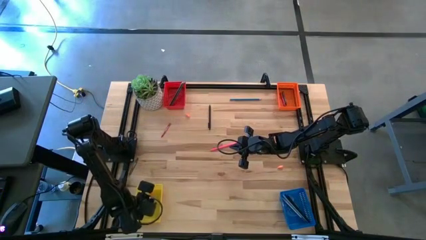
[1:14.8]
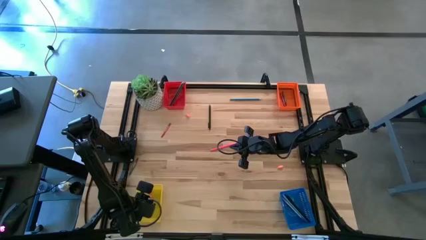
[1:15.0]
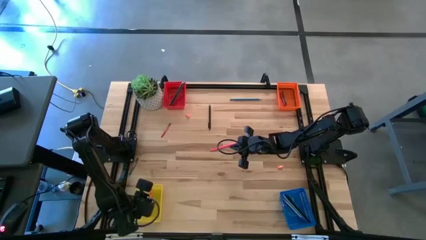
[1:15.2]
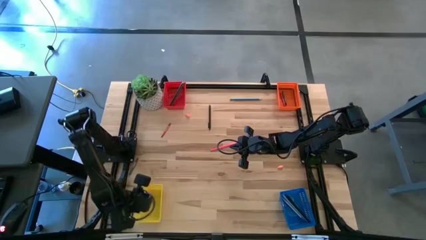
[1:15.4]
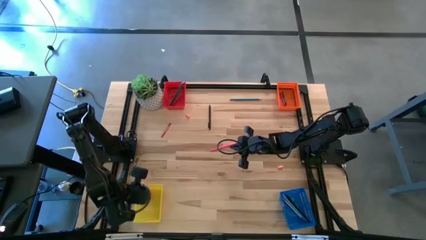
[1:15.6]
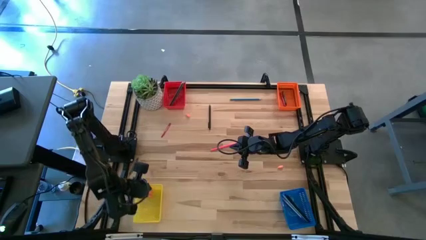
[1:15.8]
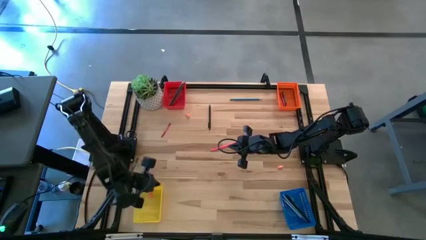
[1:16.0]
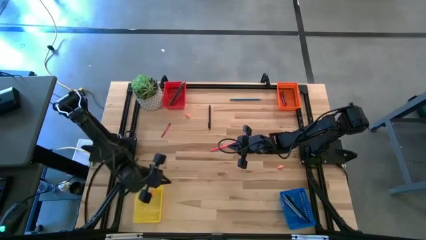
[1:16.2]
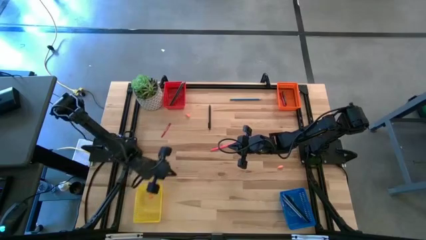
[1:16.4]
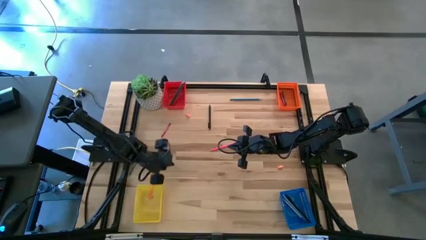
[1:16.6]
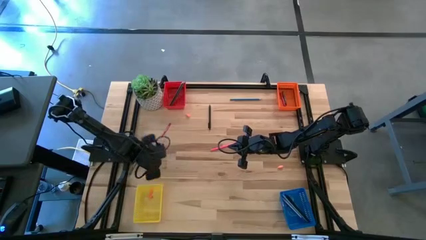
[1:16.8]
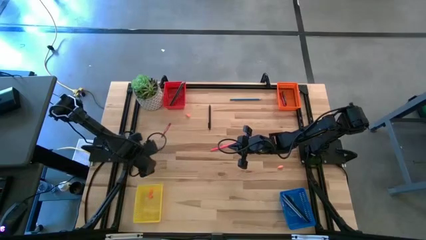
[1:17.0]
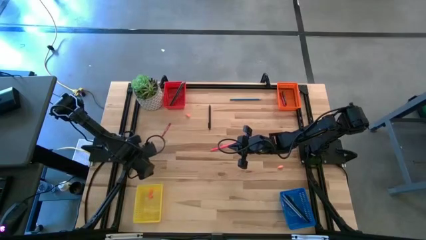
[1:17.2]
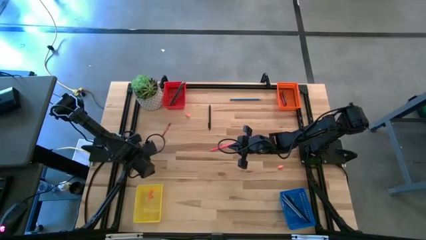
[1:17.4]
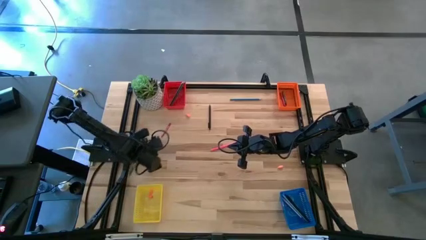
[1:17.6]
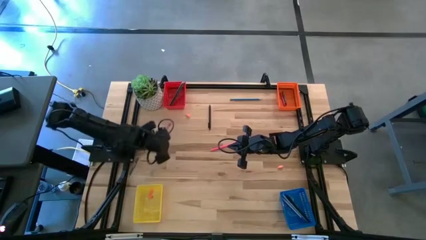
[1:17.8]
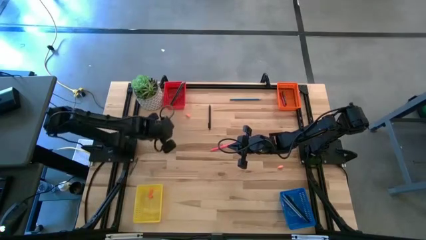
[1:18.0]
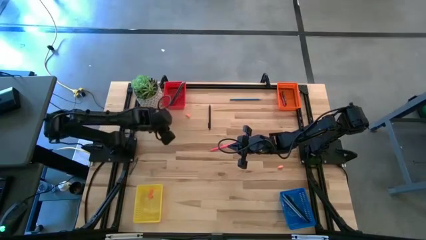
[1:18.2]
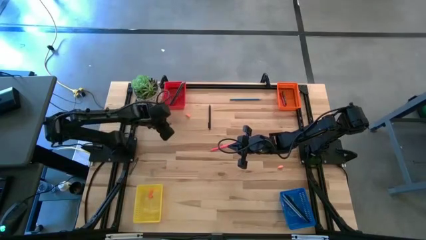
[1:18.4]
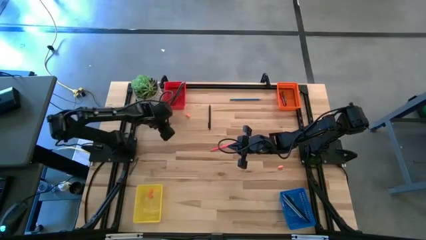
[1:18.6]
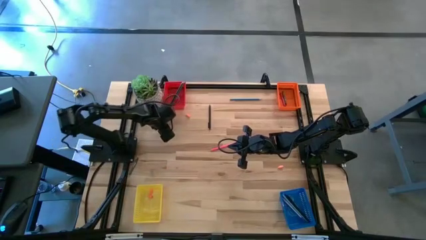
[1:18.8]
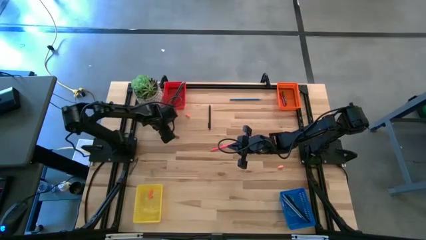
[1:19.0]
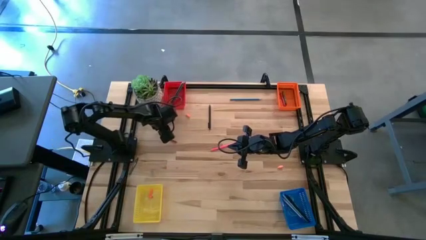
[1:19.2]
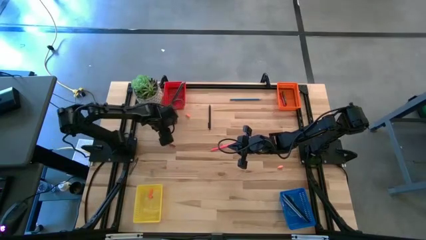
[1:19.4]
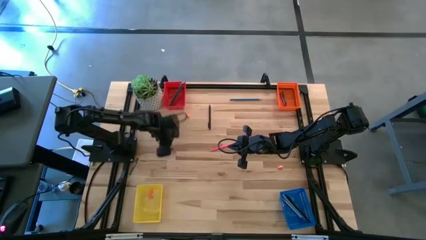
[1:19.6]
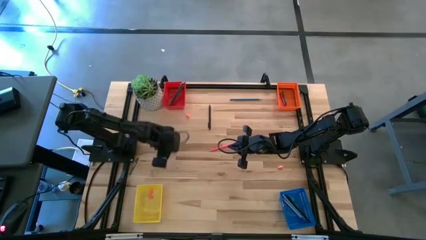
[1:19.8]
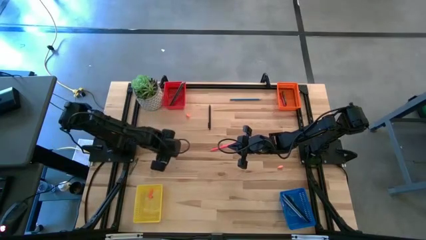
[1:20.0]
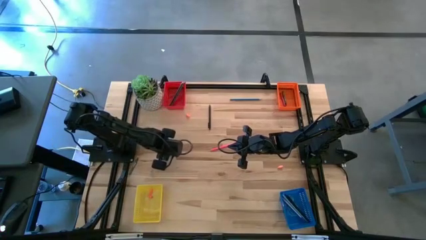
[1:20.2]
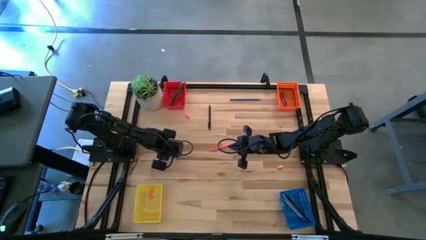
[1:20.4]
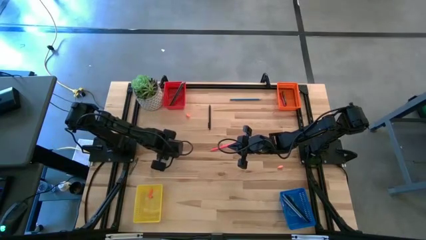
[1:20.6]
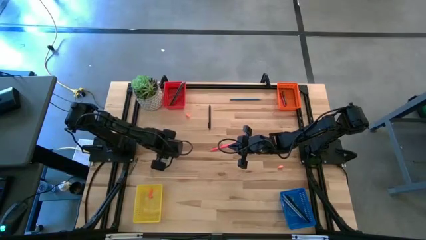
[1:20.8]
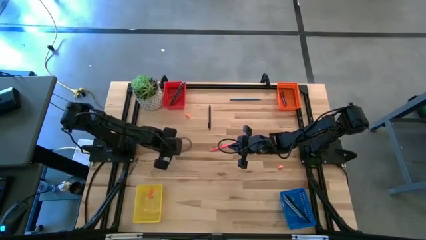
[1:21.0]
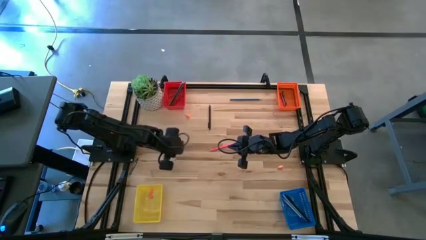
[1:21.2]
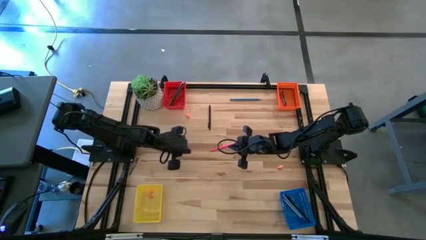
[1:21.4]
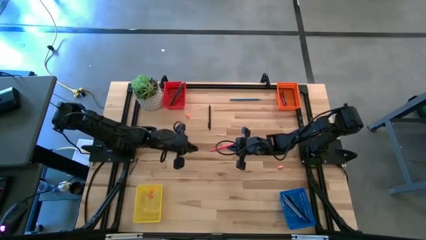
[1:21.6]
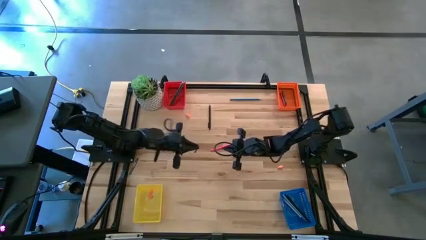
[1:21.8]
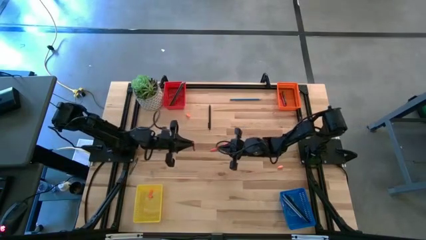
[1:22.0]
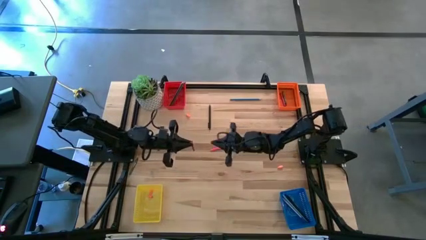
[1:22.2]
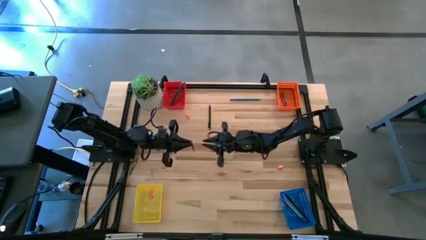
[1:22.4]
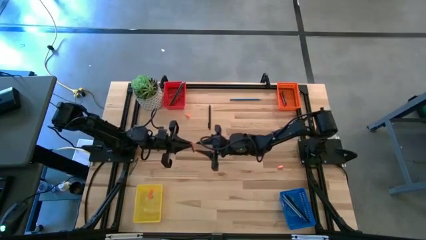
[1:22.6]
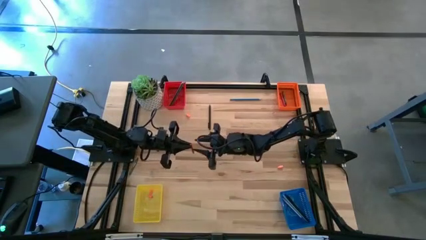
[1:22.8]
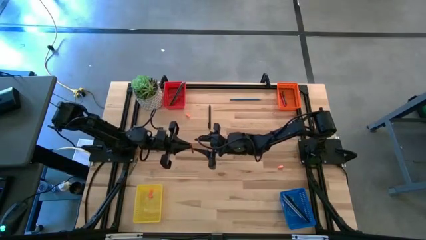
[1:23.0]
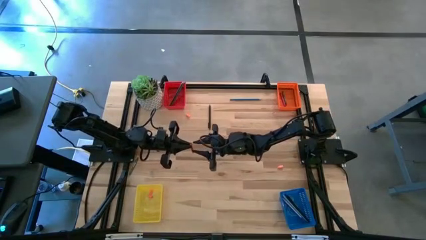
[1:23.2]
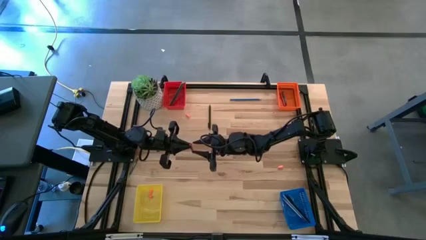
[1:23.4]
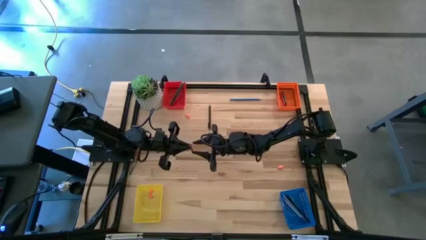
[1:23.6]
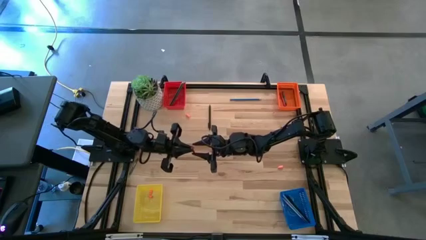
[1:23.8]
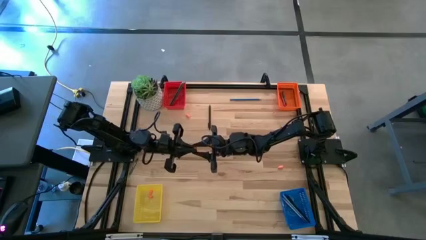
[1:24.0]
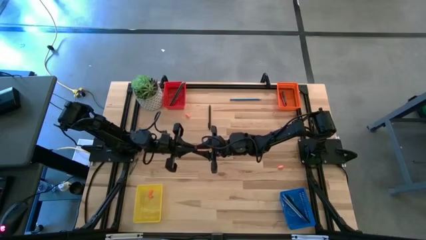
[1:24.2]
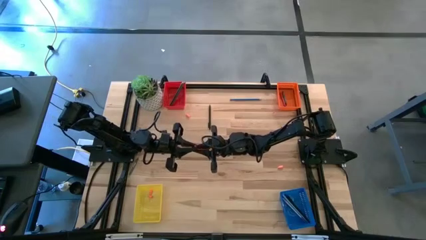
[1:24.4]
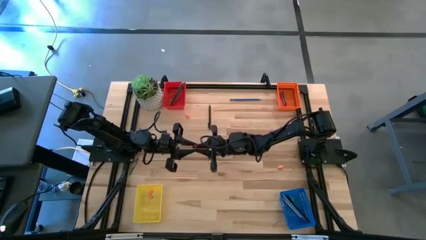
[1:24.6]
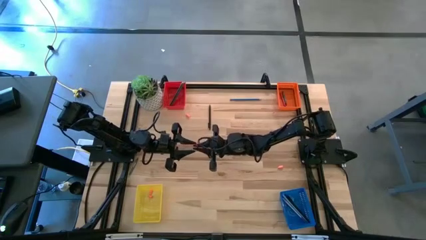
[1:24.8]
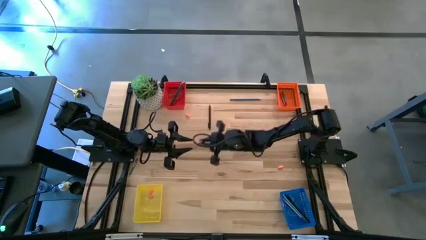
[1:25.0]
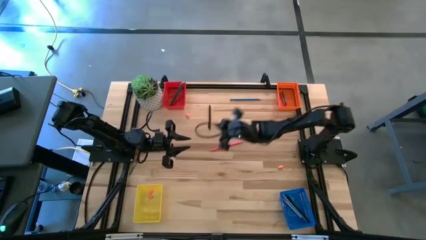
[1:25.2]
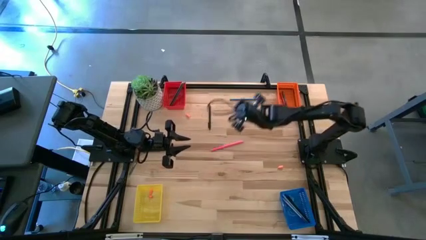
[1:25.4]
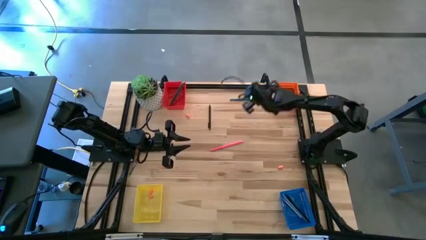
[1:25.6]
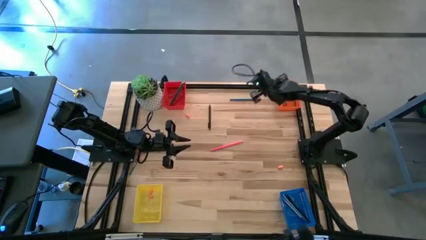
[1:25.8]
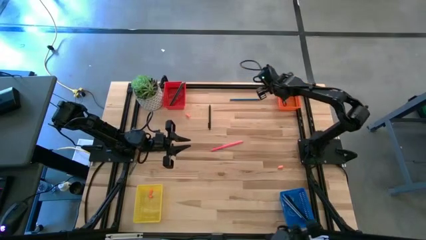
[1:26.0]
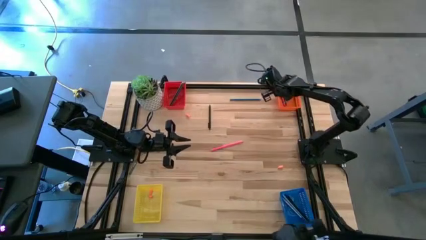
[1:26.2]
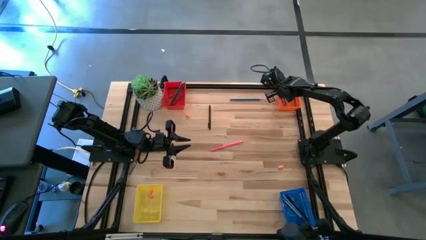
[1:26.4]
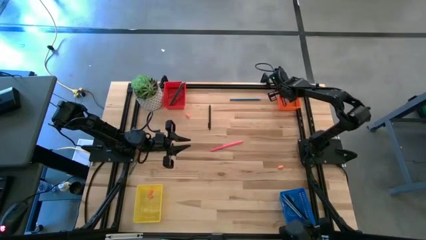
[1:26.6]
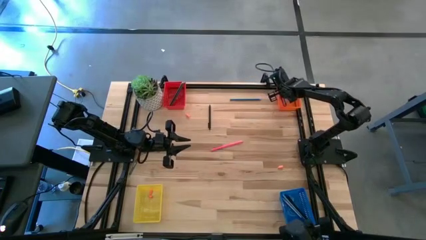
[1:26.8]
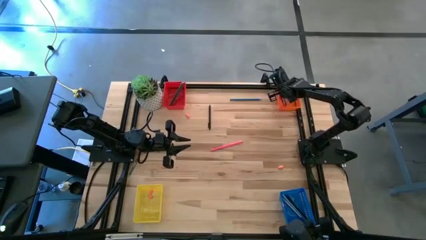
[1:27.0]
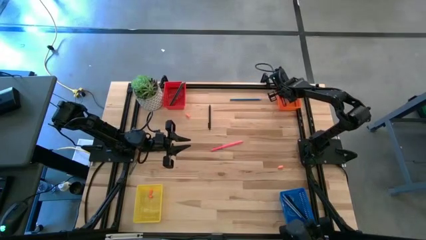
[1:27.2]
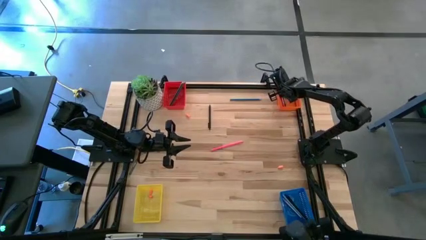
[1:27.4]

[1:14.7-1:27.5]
Task: Sort crayons/erasers/pens/pencils in bins
Put the red crayon into the orange bin
